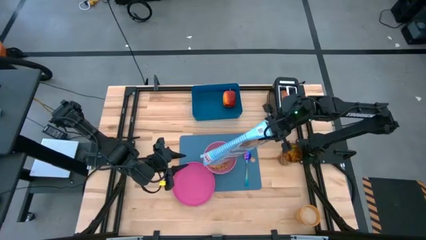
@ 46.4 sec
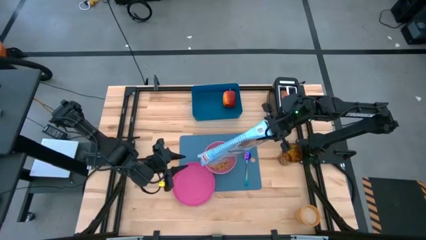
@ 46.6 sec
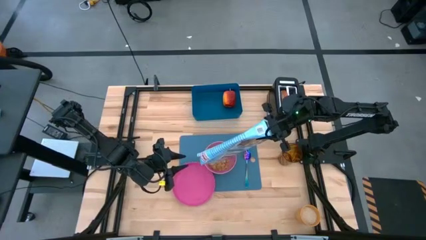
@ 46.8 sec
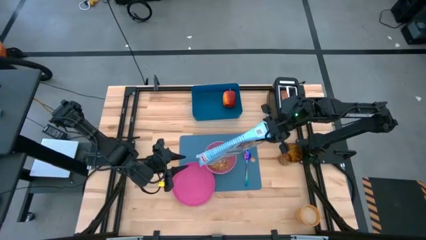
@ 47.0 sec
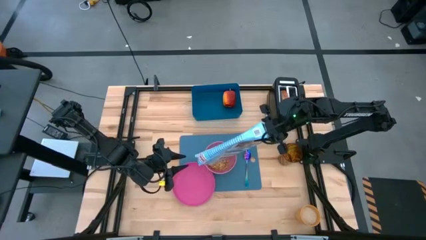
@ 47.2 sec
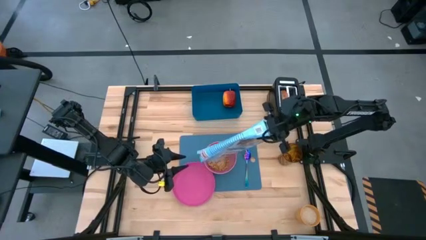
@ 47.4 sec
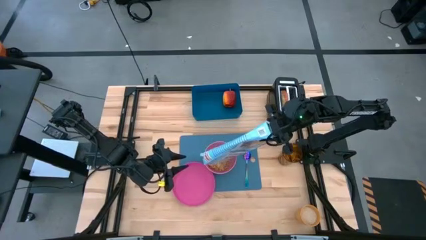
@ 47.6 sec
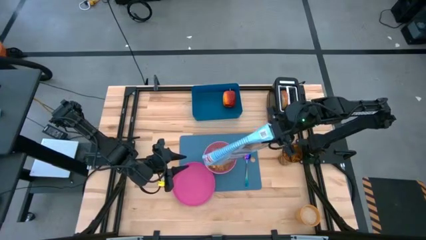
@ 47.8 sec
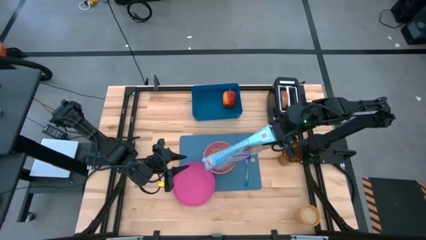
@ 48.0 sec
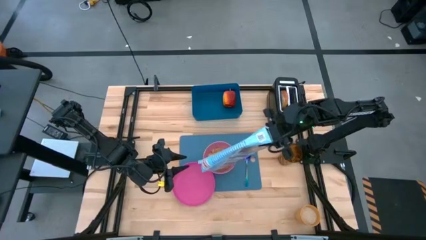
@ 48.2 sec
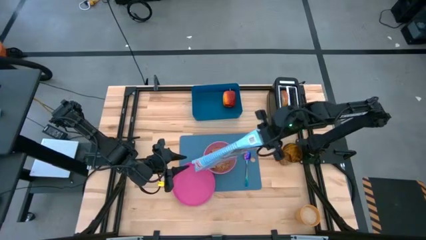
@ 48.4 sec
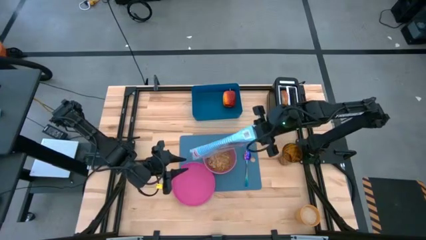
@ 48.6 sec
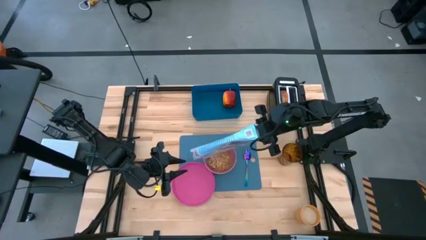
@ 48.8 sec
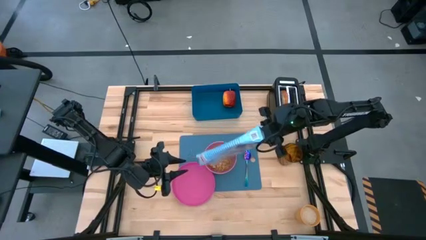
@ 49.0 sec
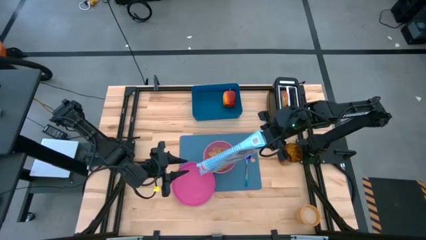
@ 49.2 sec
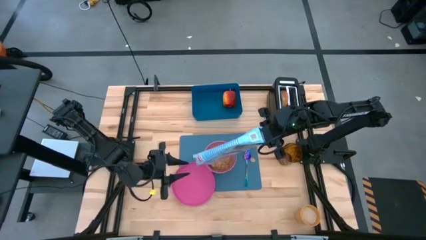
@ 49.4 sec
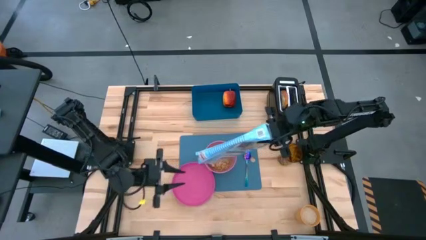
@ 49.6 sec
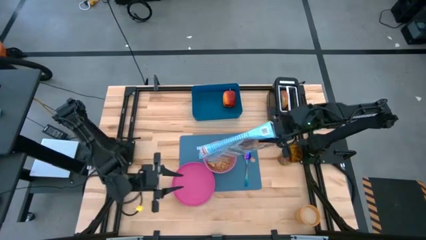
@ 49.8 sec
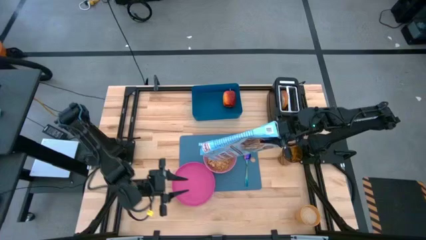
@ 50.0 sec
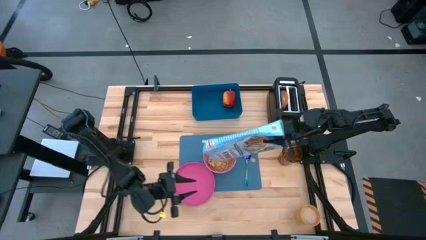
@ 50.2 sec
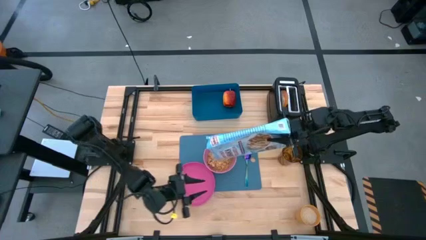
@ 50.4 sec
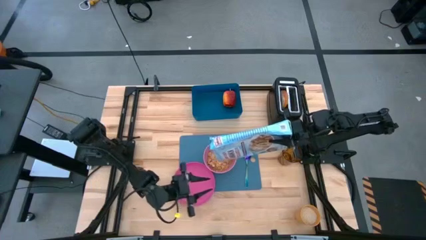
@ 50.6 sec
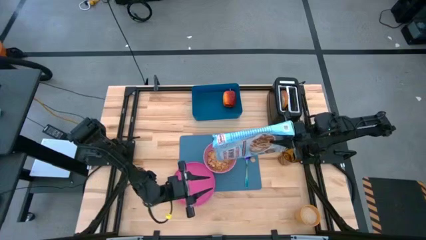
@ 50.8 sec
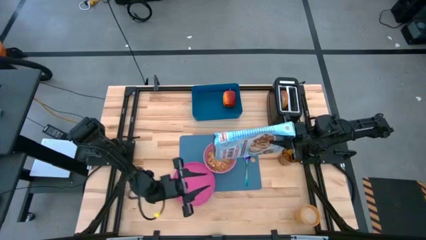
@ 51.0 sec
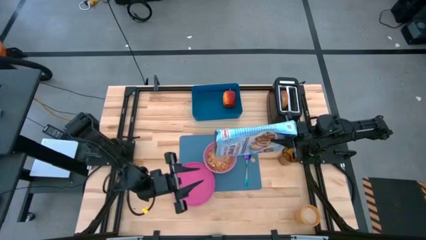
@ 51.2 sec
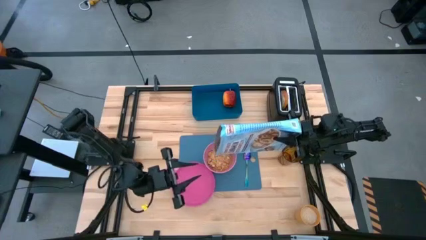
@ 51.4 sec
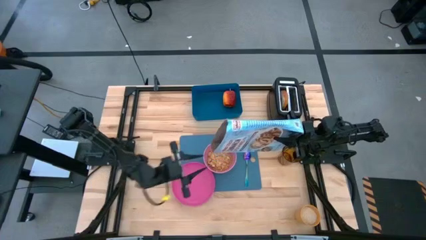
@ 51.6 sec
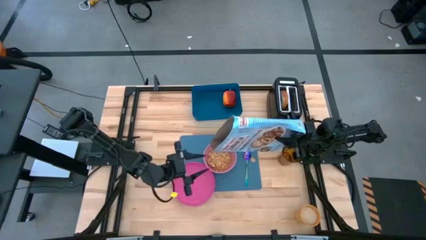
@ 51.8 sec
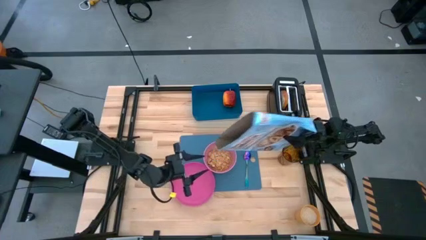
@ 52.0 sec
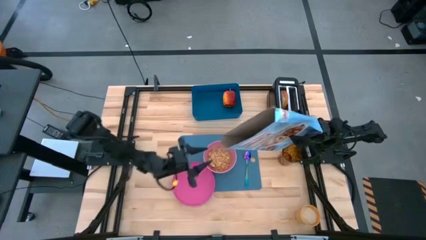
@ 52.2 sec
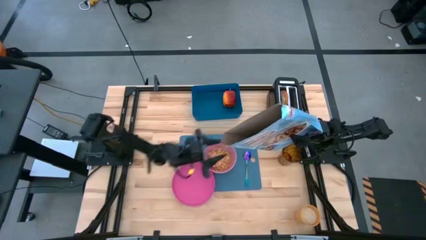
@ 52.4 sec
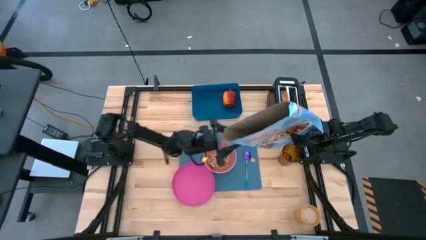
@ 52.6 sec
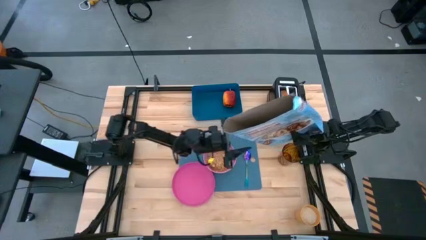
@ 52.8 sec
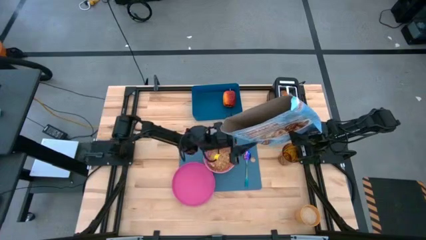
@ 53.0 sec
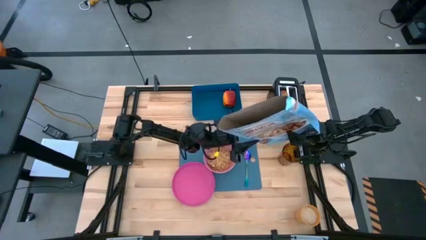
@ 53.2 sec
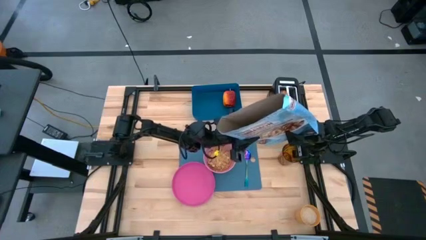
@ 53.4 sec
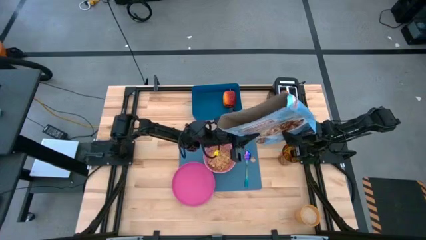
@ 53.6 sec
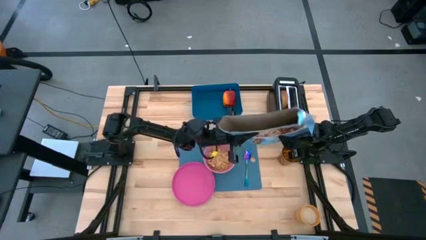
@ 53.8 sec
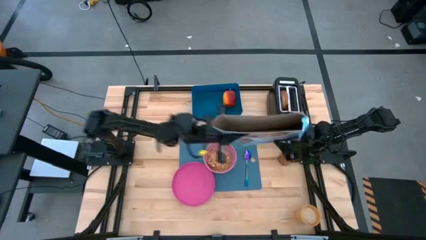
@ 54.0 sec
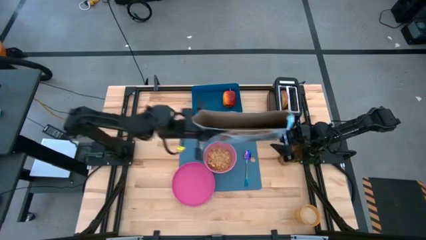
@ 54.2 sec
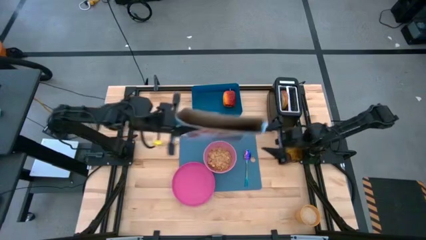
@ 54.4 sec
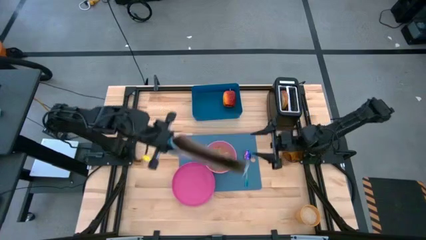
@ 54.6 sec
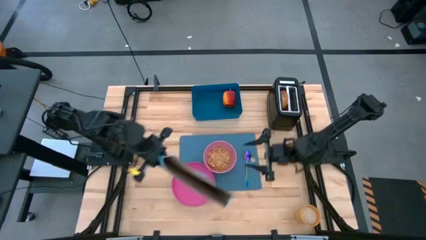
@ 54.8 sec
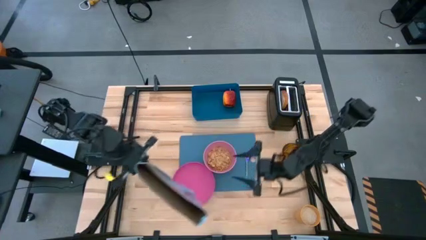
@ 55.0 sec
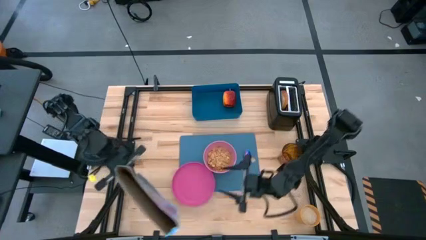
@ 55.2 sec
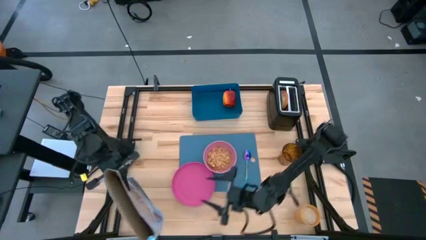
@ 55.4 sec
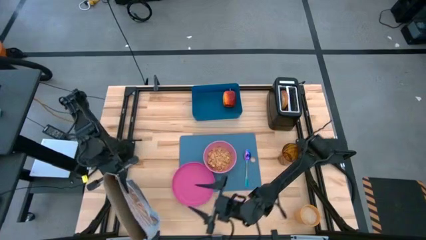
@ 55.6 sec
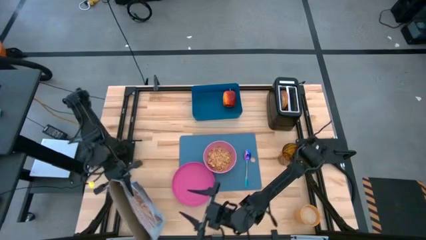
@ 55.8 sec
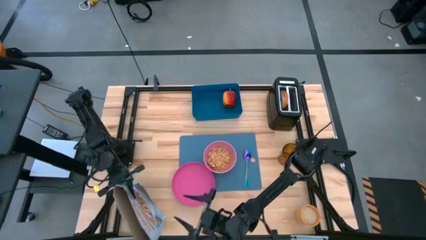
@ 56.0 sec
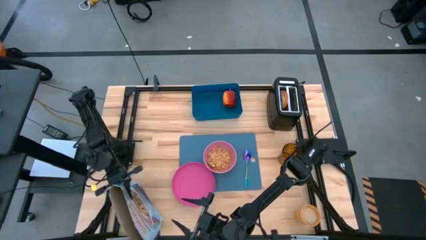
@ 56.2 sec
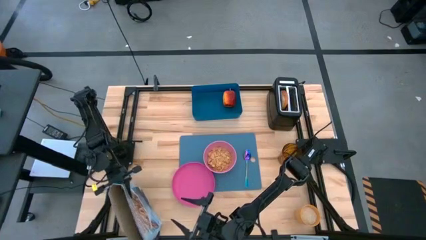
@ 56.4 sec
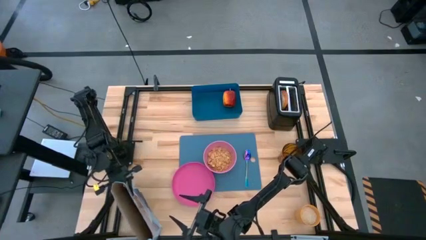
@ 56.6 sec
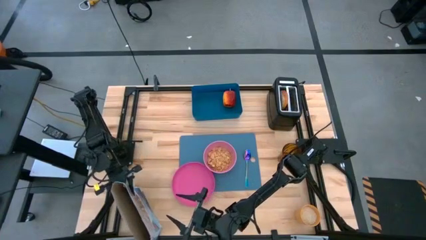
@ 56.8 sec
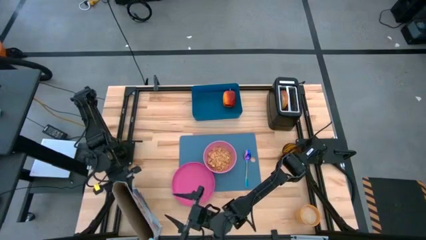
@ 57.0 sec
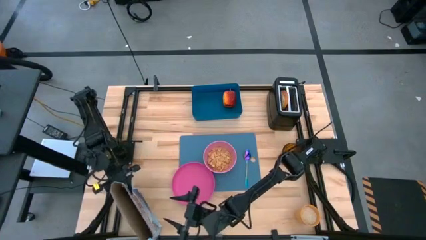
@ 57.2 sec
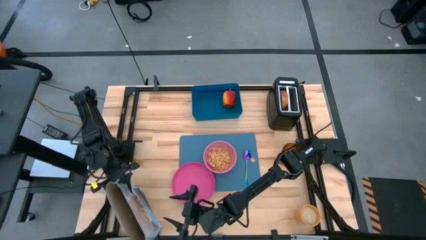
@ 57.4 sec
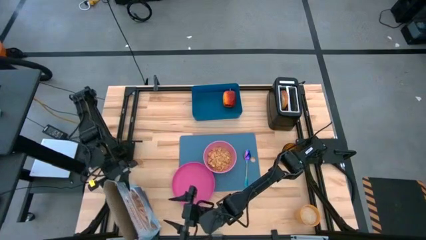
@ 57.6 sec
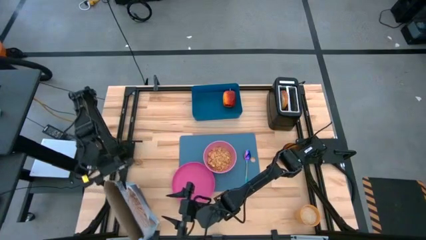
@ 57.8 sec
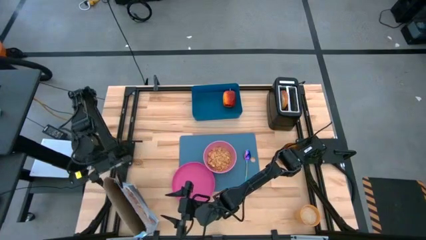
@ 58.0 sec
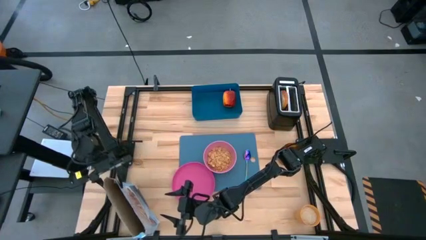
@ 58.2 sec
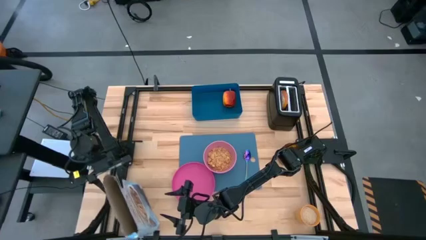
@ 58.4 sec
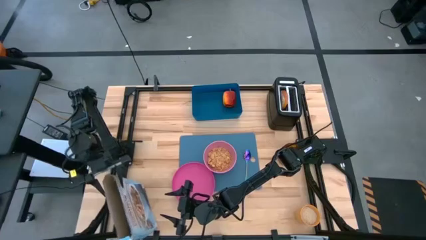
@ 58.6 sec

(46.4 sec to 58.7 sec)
Task: Arrange a breakfast setting
Pour the cereal from the blue cereal box into the pink bowl

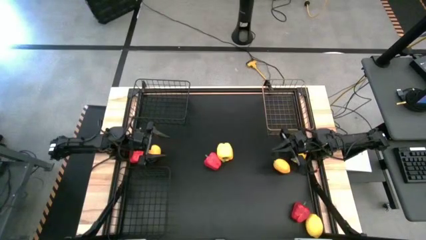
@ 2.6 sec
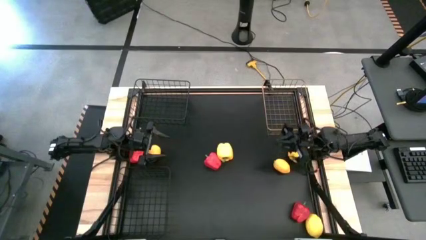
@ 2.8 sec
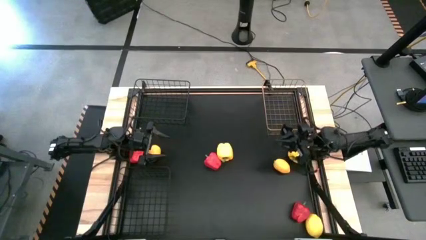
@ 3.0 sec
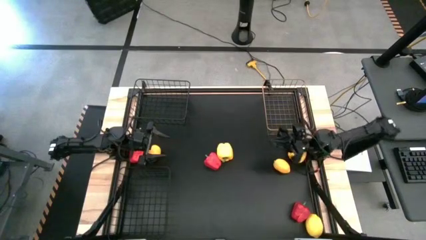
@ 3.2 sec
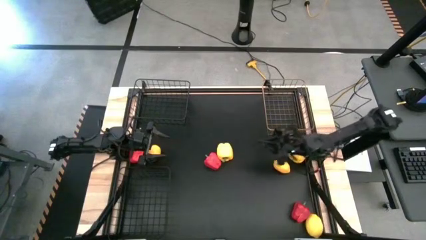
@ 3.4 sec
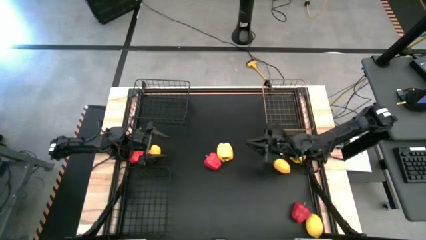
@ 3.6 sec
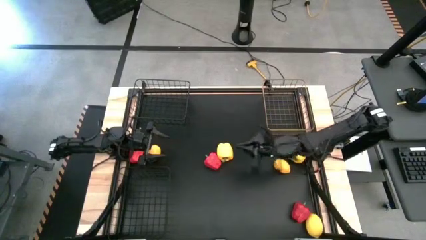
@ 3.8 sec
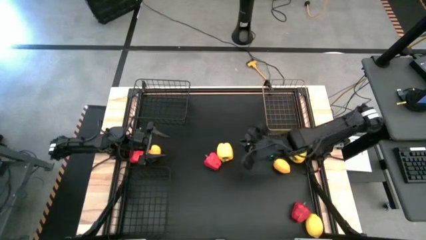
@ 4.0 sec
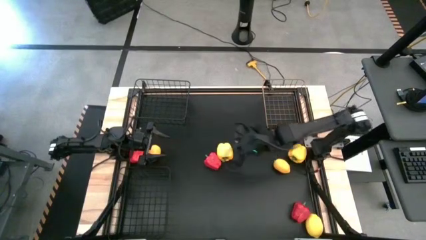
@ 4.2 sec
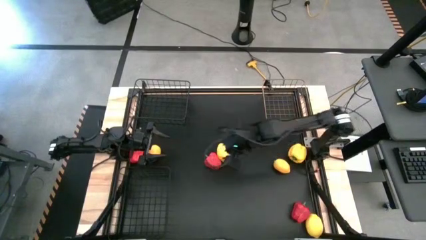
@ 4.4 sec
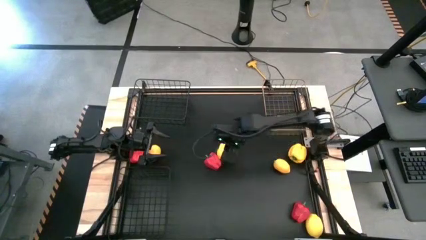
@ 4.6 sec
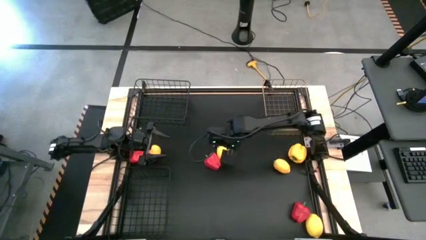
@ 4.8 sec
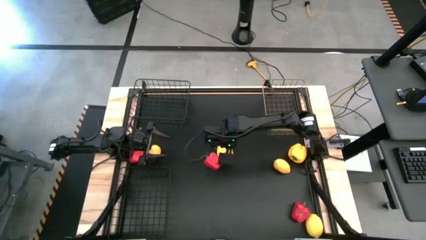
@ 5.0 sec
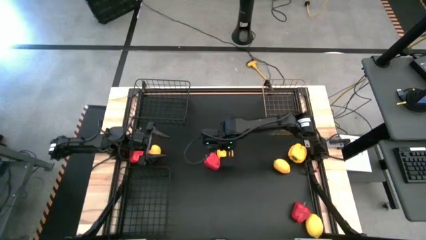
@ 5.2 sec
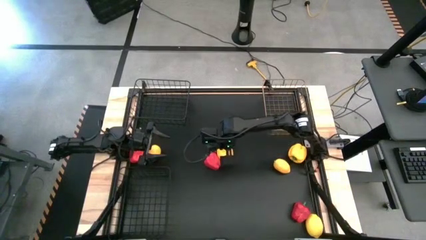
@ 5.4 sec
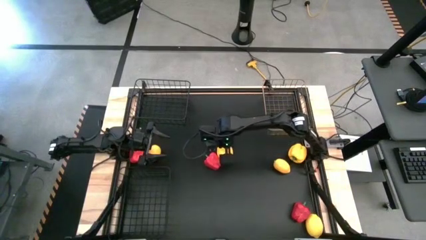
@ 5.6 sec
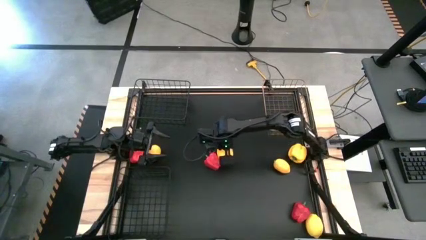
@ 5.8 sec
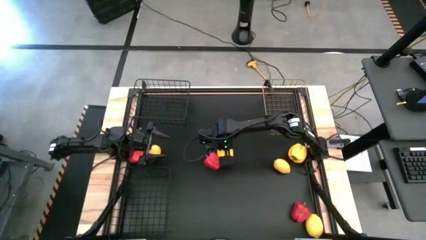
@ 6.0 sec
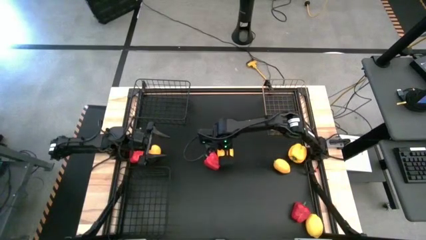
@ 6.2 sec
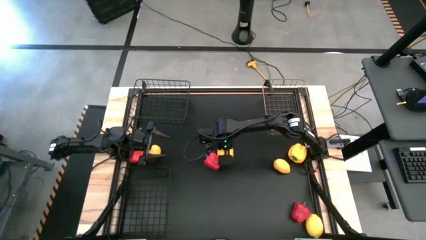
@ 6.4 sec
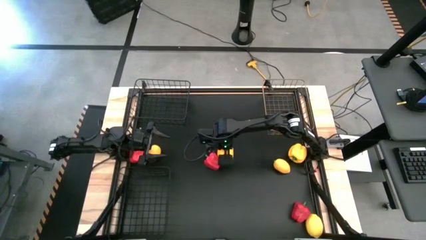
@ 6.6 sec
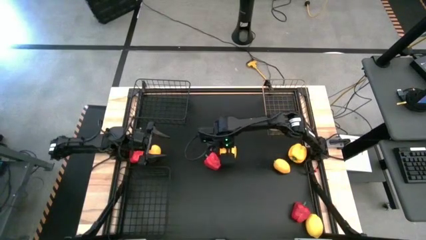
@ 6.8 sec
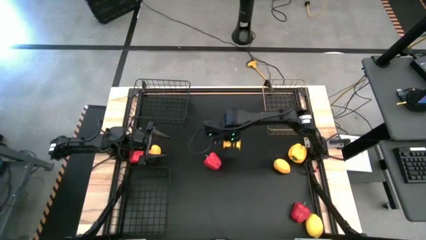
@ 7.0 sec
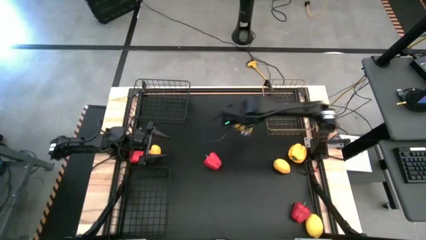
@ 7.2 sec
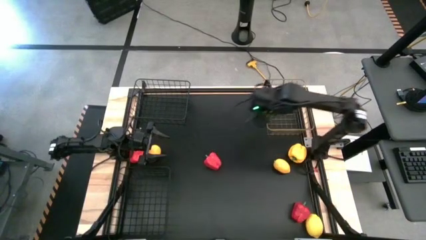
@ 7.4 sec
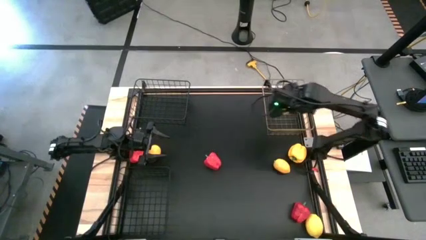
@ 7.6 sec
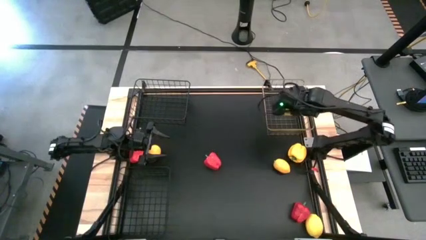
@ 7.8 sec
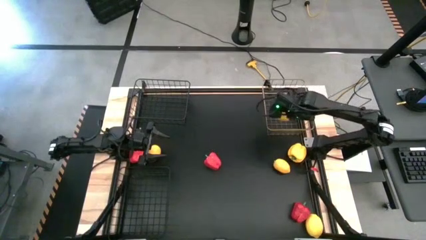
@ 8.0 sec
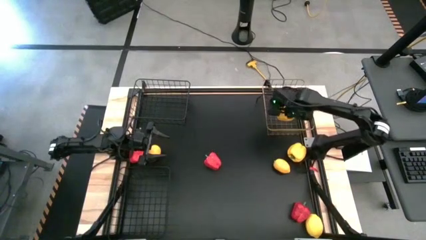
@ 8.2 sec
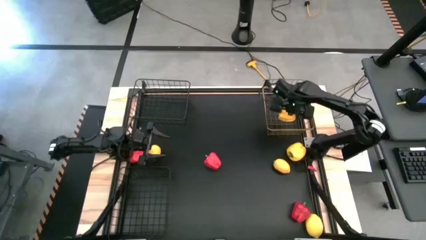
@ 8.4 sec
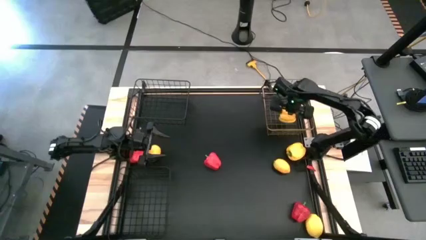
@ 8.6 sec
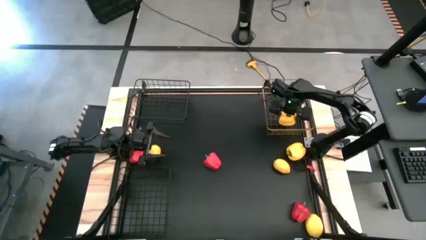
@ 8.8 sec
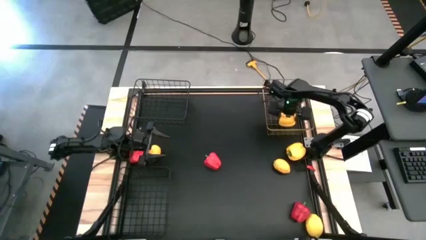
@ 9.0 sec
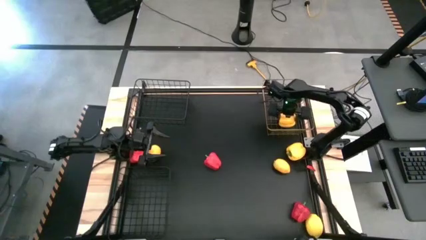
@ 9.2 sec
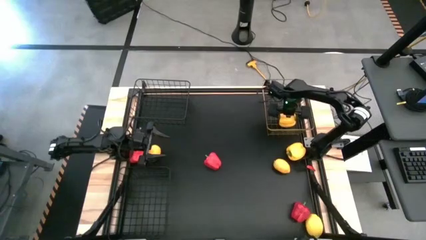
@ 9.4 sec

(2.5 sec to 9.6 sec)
Task: Sort produce into baskets
Put the left yellow bell pepper into the gold wire basket
